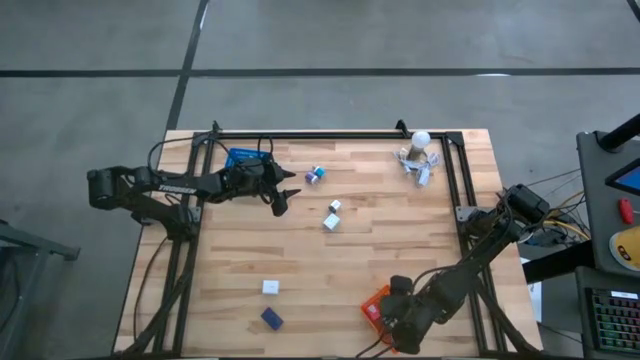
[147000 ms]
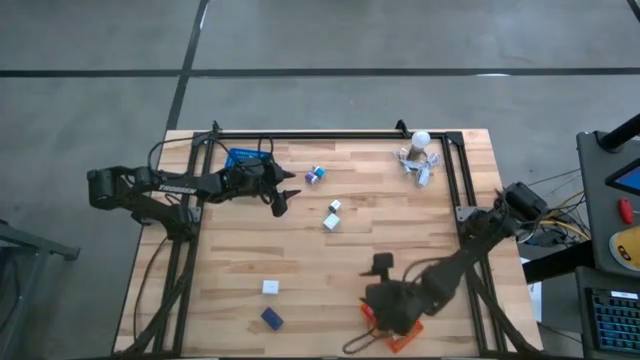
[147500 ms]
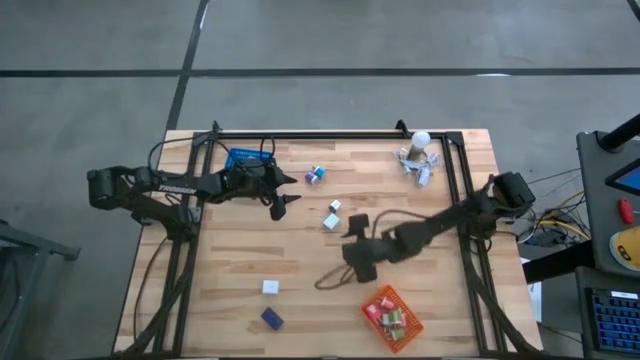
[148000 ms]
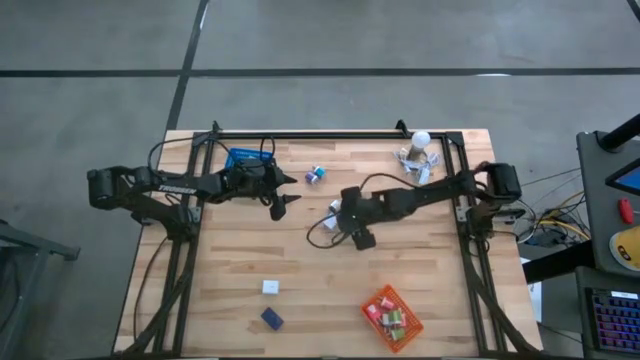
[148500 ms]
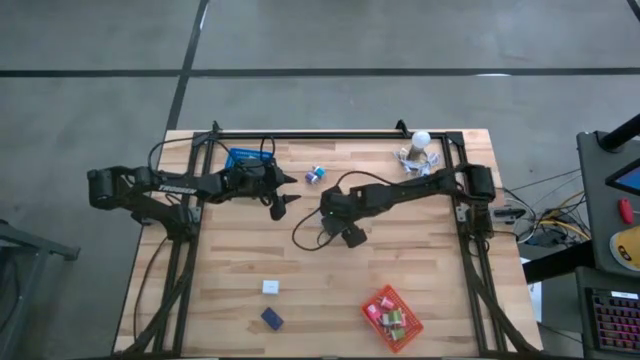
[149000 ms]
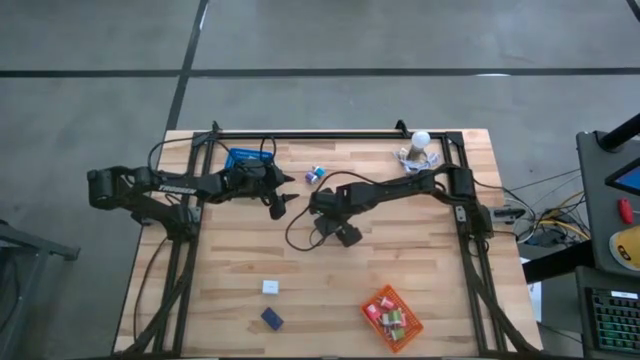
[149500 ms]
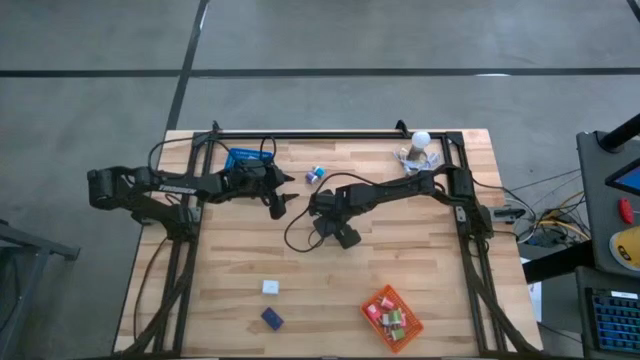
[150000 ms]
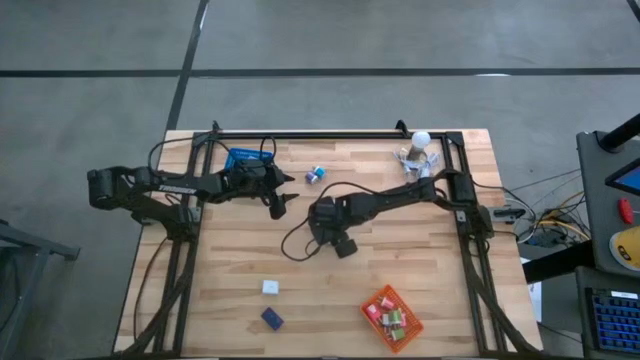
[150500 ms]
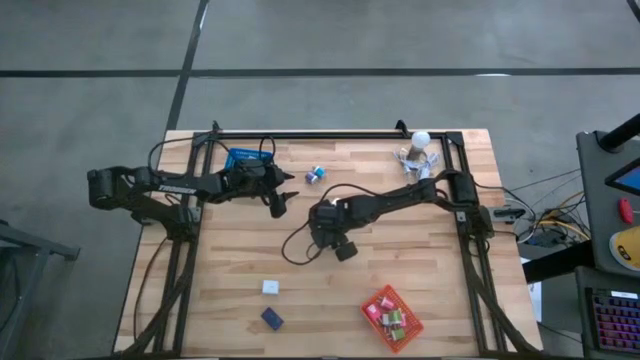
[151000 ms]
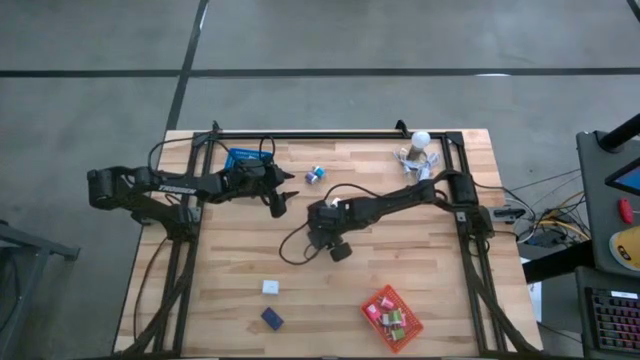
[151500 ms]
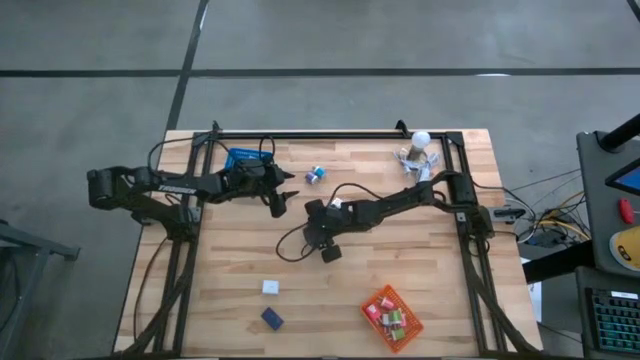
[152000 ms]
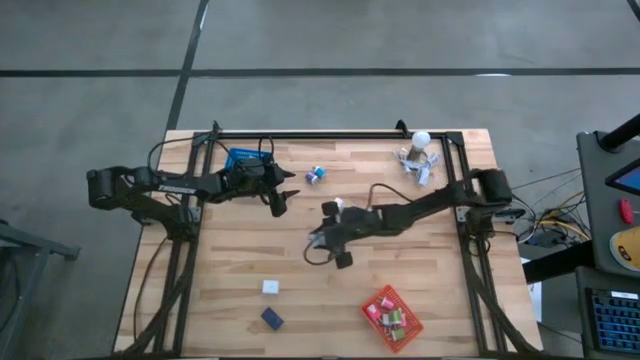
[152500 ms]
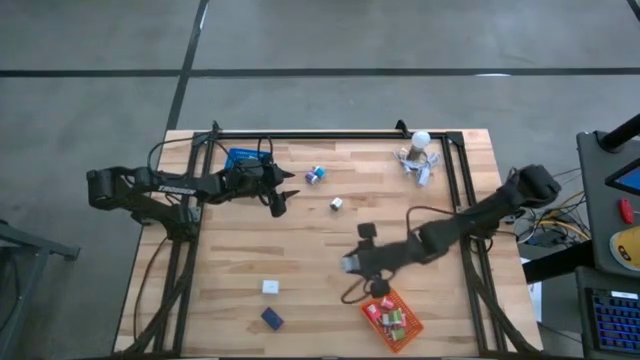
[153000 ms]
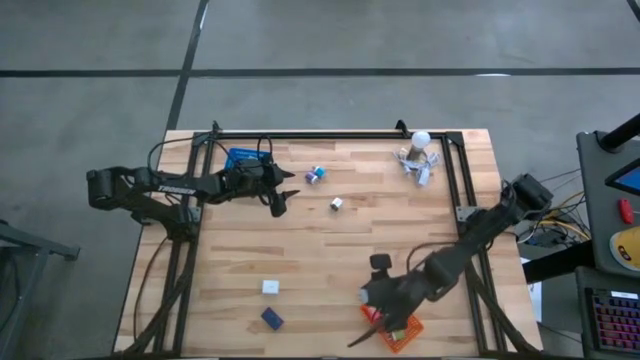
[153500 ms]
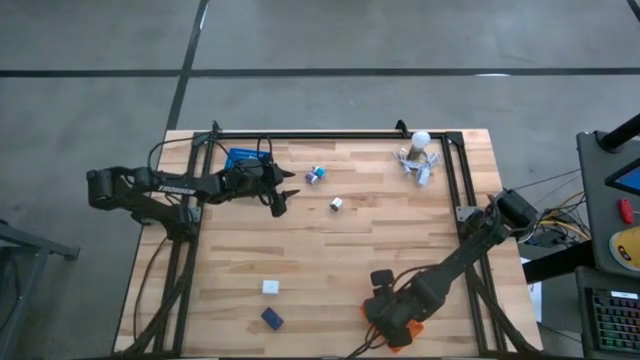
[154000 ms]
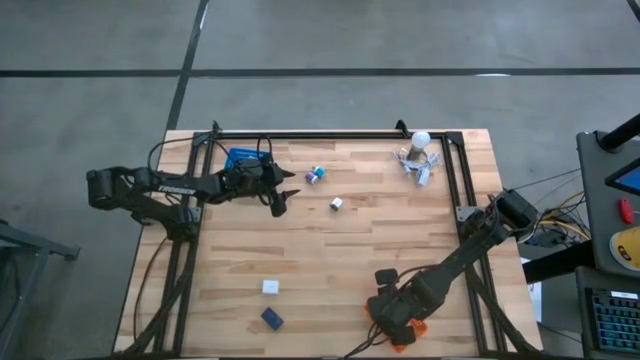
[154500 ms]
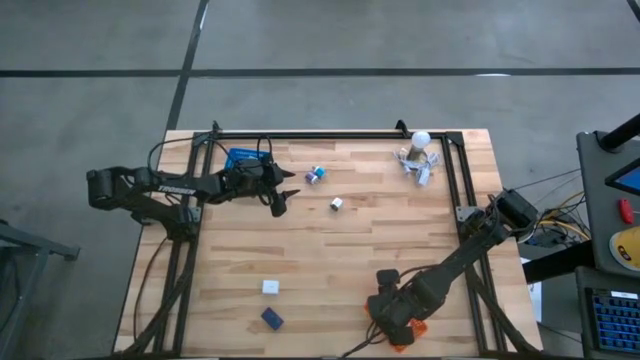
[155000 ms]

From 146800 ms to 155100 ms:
Task: Pick & Place Office items
Put the top white charger adapter into the orange bin

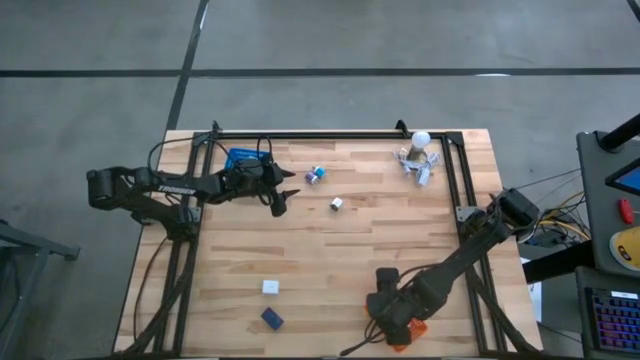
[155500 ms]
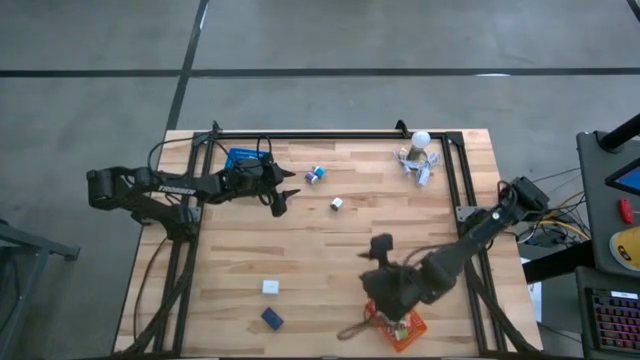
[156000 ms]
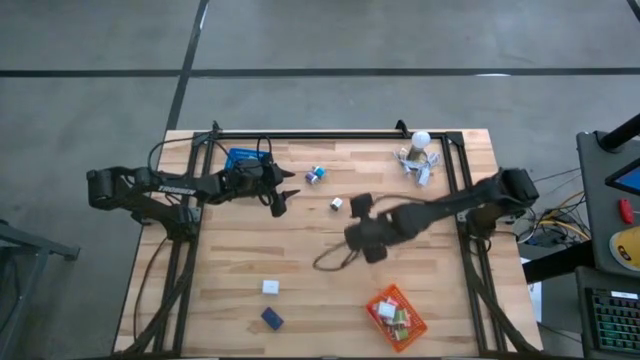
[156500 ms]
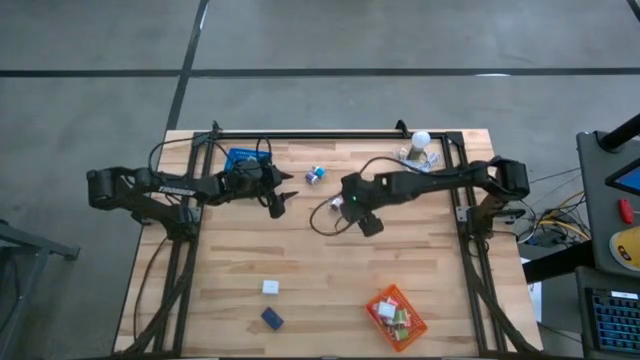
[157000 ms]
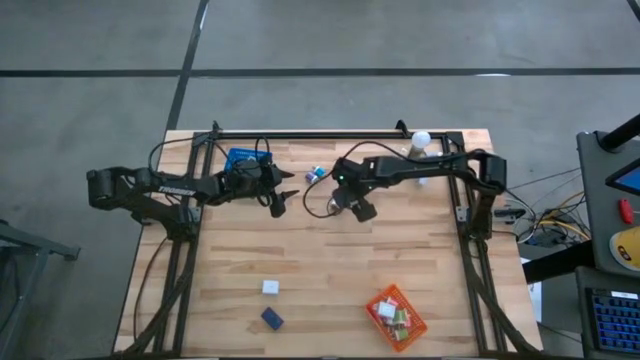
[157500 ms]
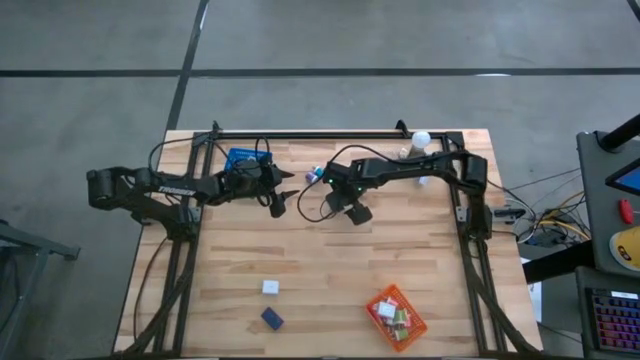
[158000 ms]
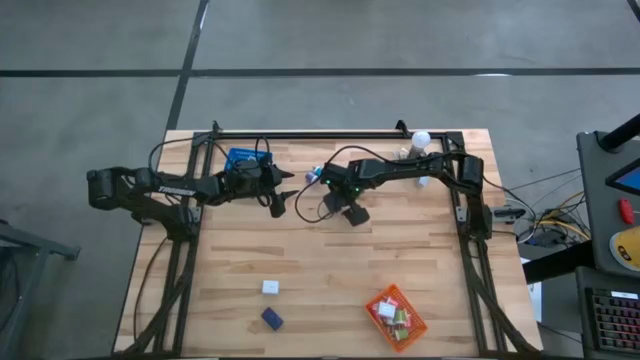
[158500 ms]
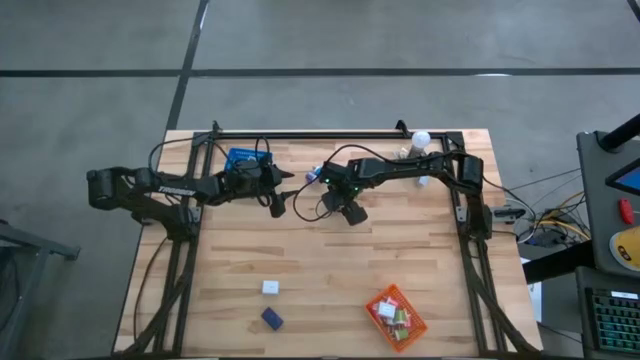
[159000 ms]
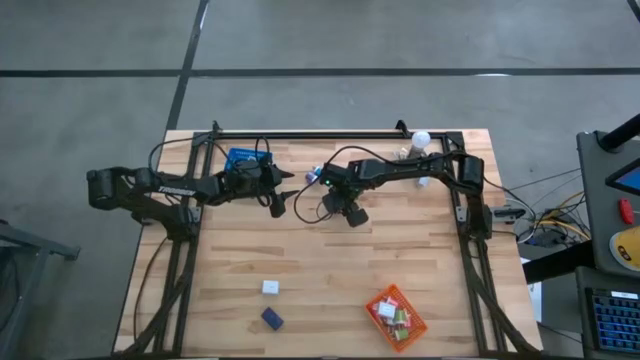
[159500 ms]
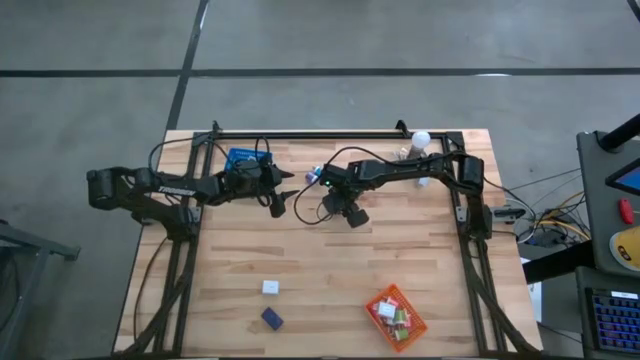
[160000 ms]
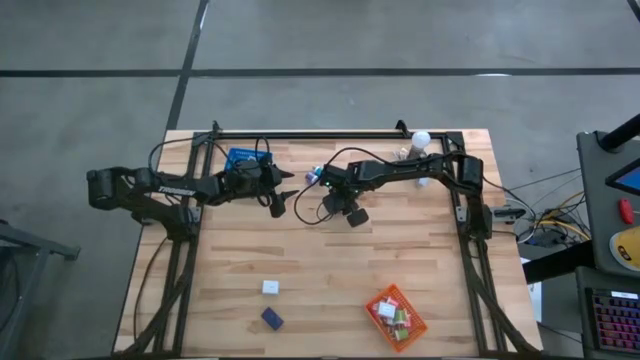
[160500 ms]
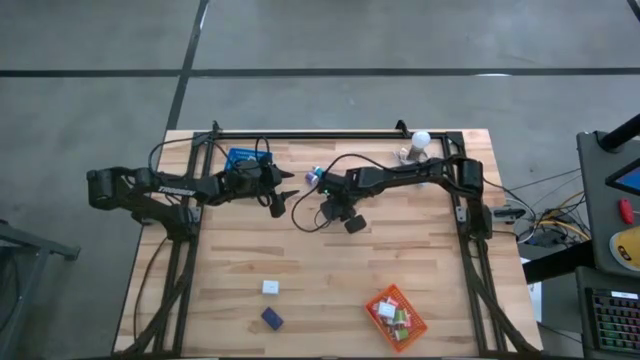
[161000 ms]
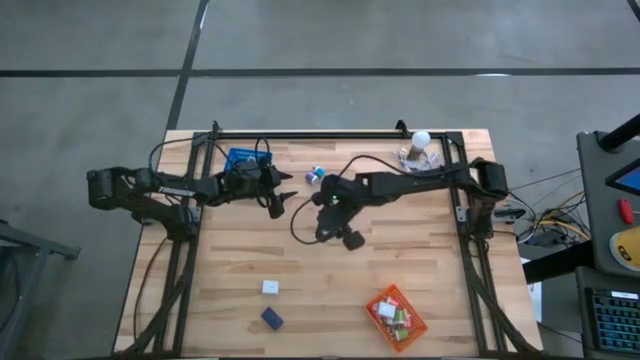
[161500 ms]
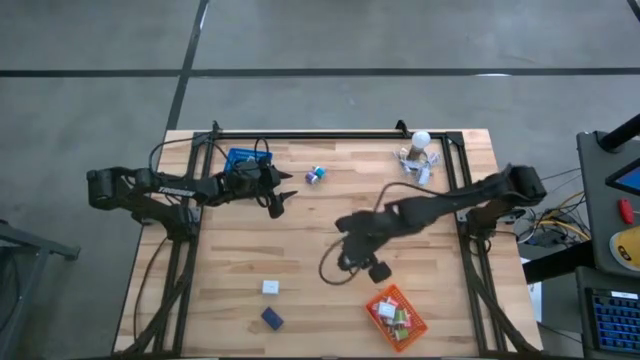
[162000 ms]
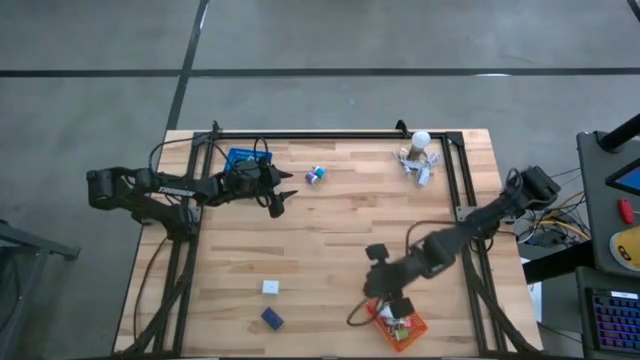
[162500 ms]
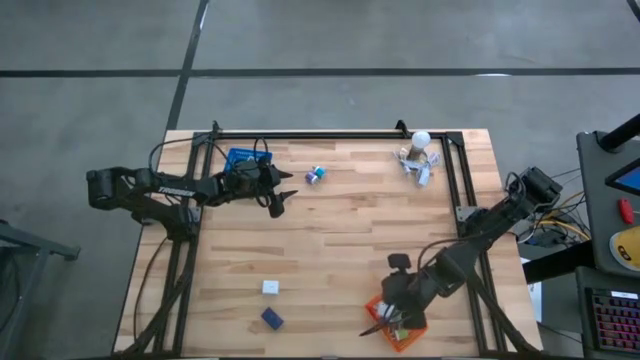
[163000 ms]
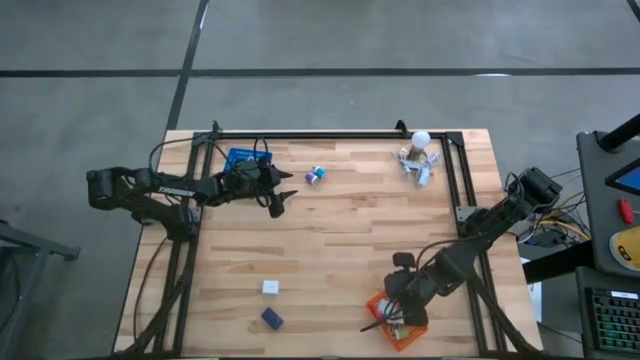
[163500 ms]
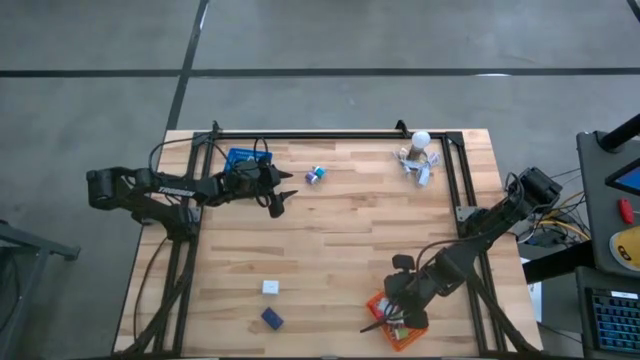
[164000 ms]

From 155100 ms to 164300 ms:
Put the white and black charger adapter into the orange bin

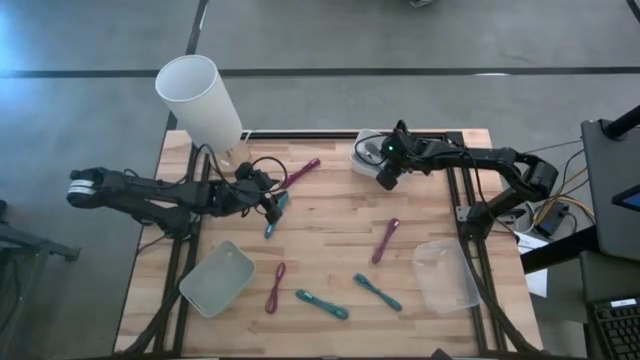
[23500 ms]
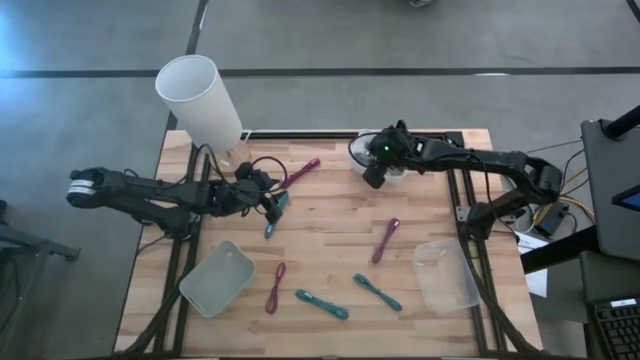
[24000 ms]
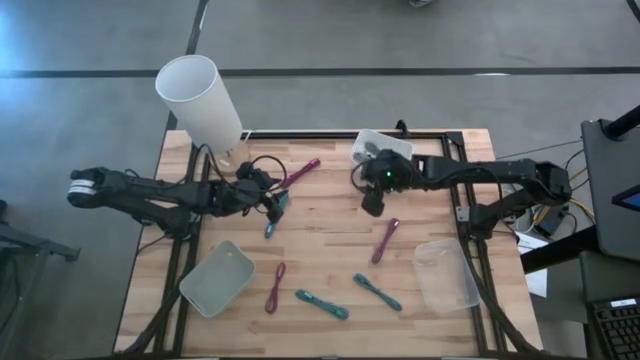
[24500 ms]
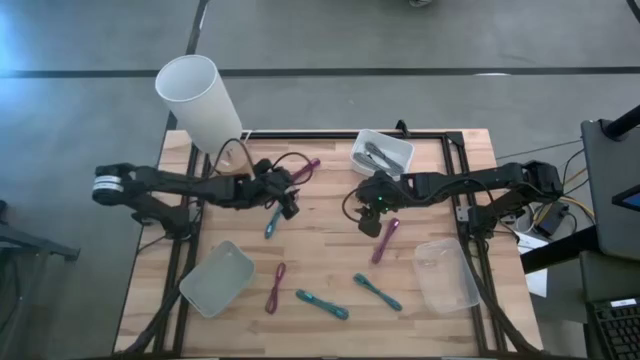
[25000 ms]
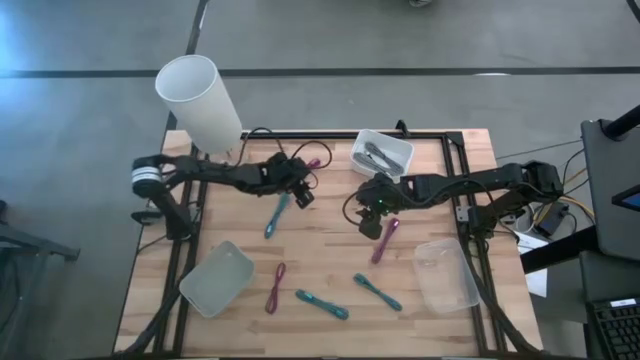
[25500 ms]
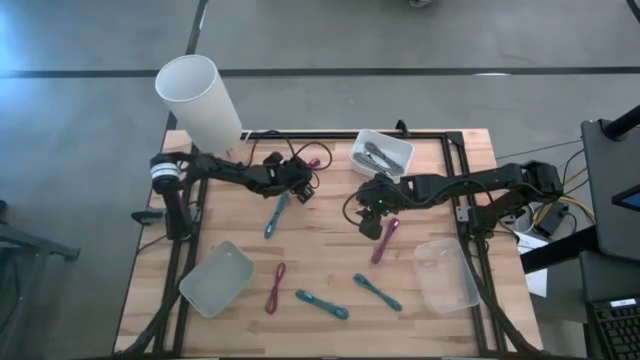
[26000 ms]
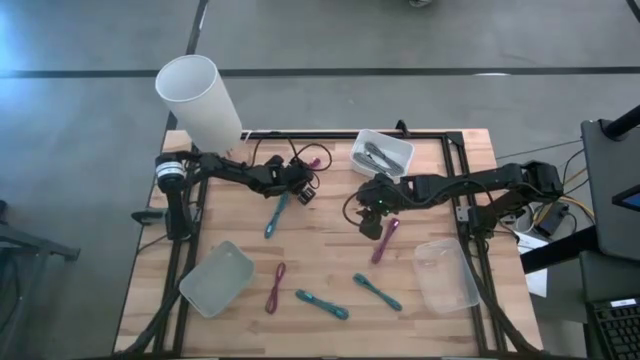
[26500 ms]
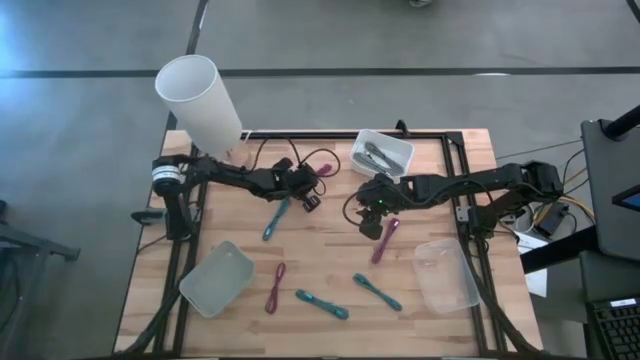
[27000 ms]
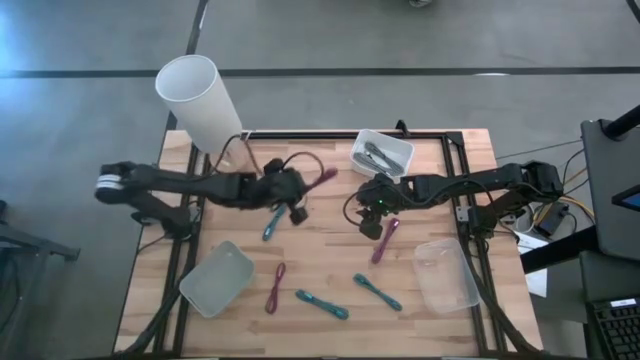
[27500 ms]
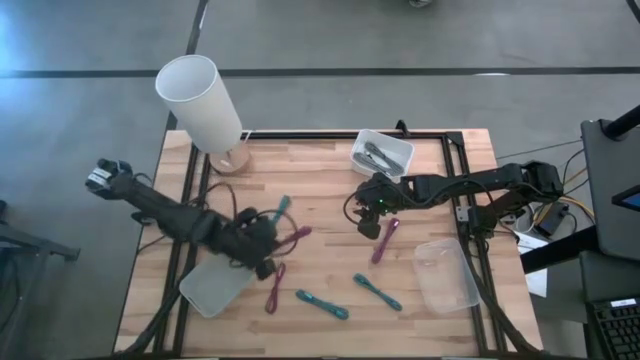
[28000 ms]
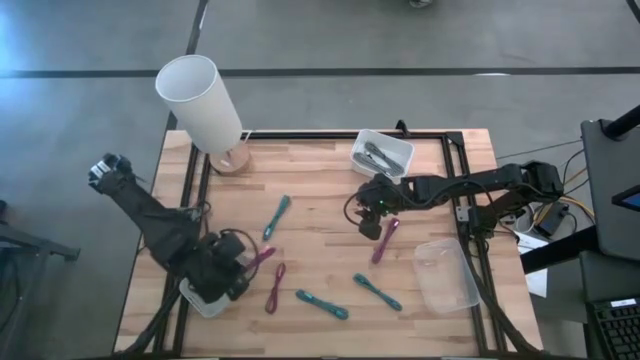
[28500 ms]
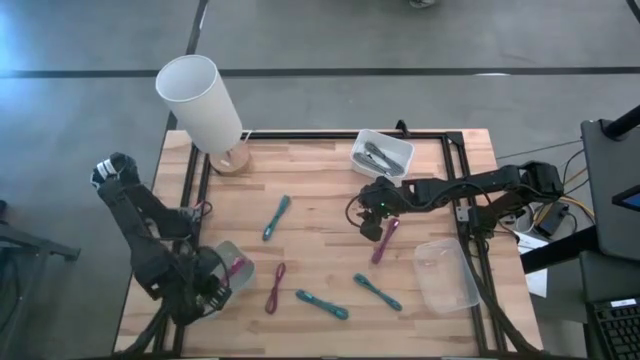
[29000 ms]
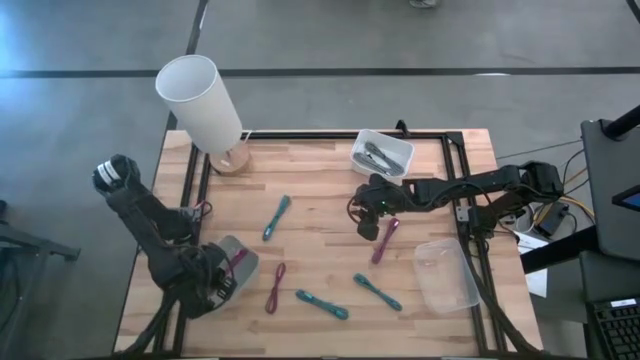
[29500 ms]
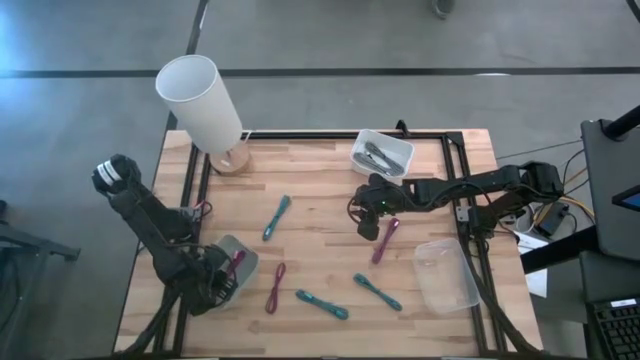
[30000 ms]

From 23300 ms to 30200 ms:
Task: Pick & Place USB Port
Put the top red patterned charger cable into the gray bin
